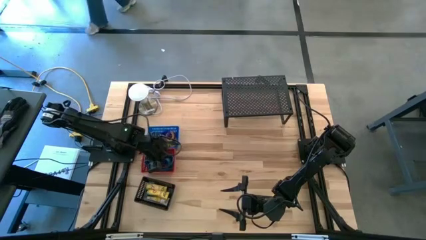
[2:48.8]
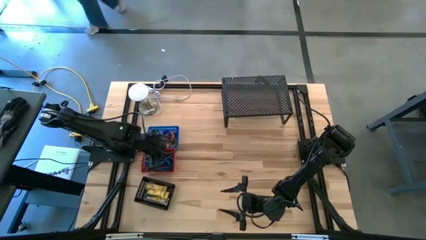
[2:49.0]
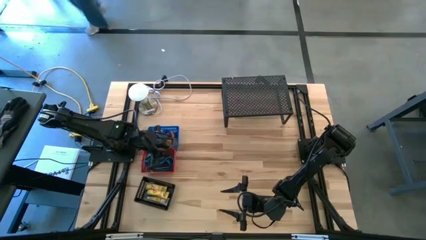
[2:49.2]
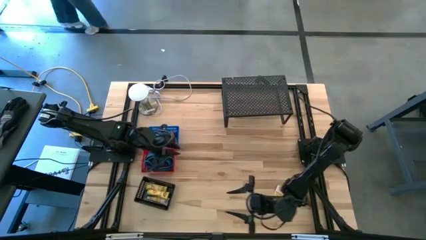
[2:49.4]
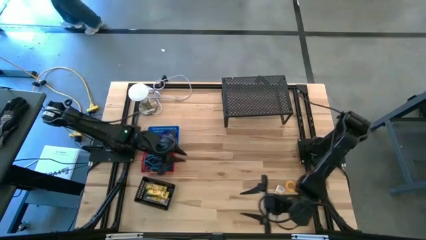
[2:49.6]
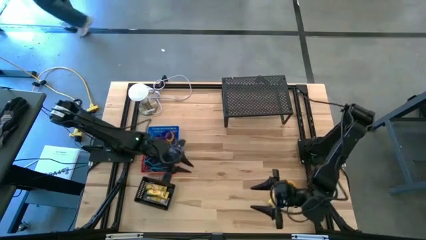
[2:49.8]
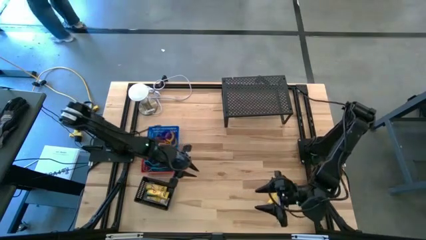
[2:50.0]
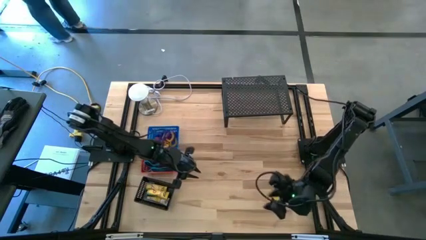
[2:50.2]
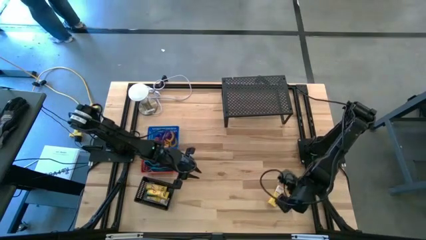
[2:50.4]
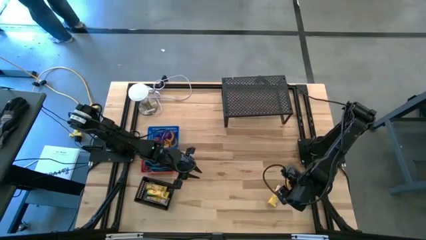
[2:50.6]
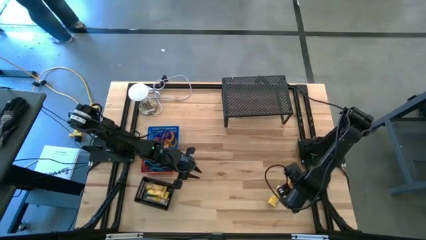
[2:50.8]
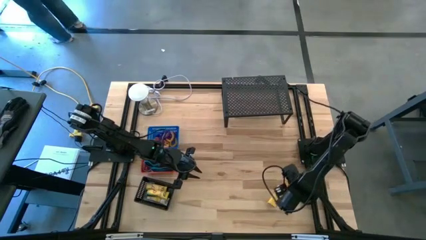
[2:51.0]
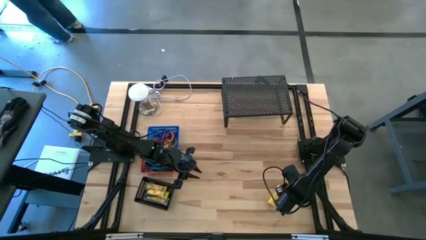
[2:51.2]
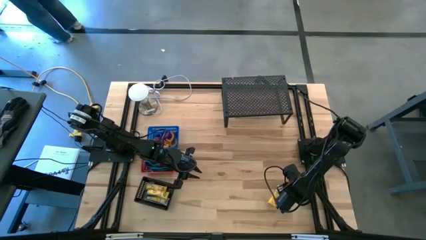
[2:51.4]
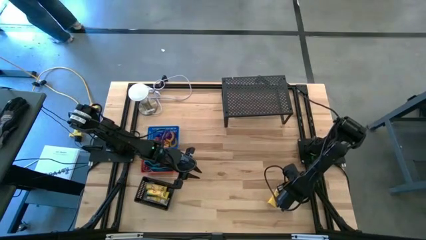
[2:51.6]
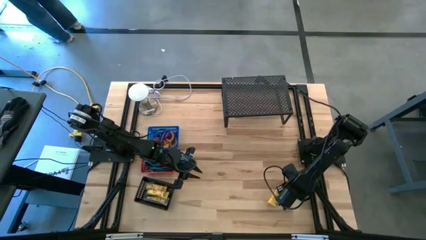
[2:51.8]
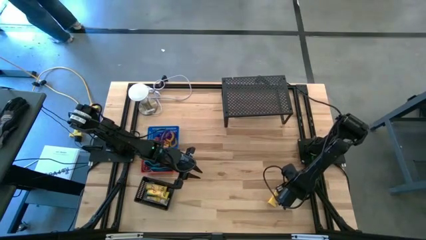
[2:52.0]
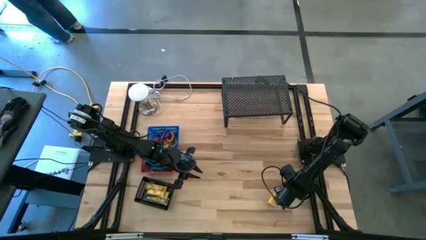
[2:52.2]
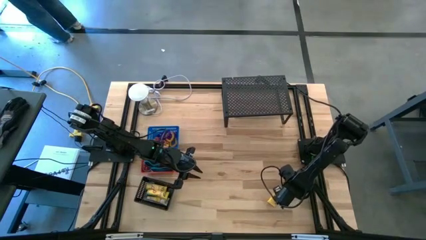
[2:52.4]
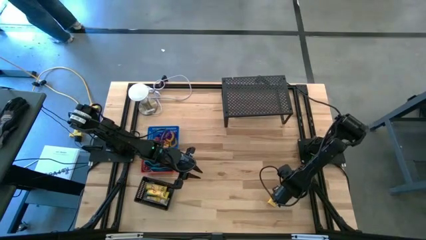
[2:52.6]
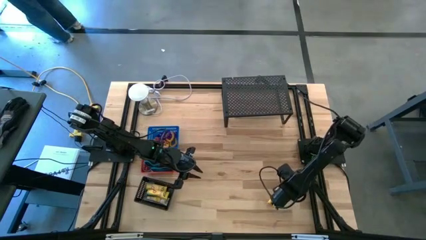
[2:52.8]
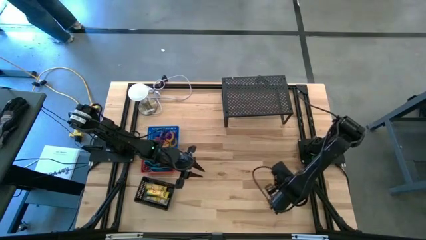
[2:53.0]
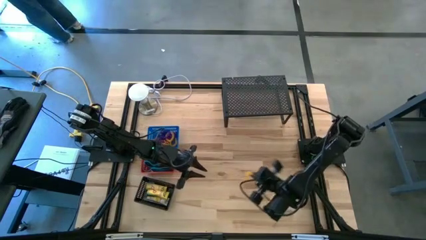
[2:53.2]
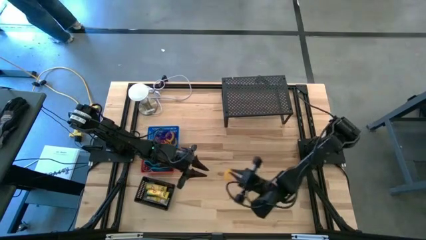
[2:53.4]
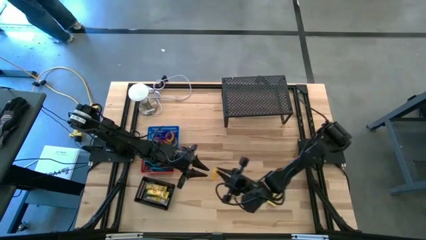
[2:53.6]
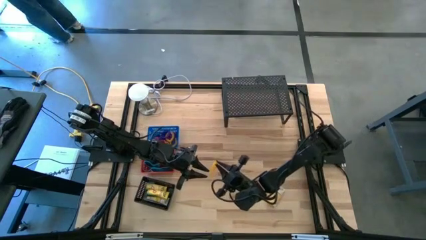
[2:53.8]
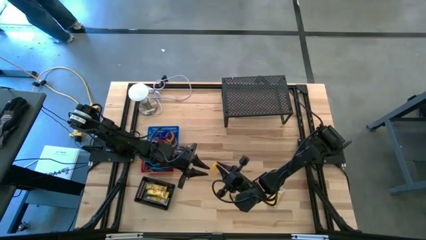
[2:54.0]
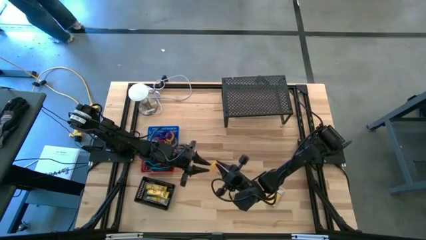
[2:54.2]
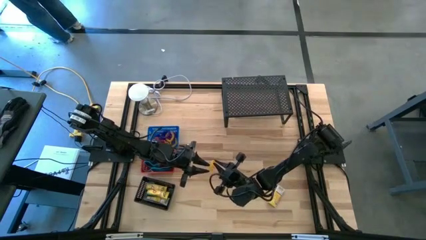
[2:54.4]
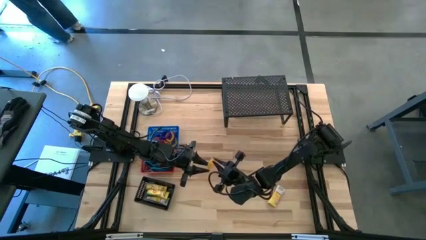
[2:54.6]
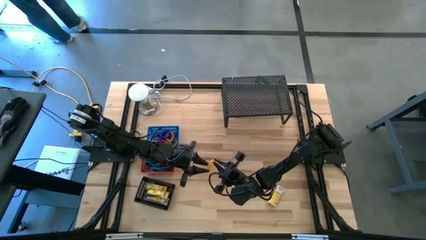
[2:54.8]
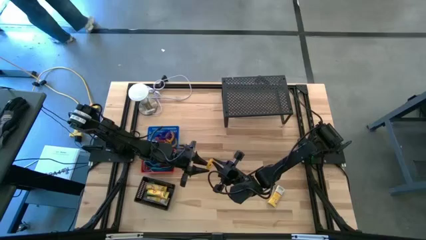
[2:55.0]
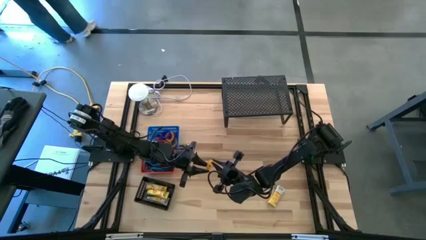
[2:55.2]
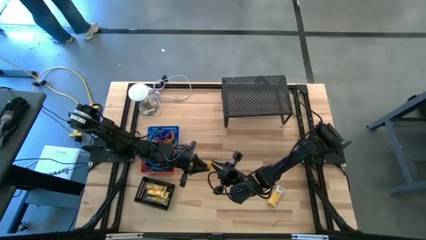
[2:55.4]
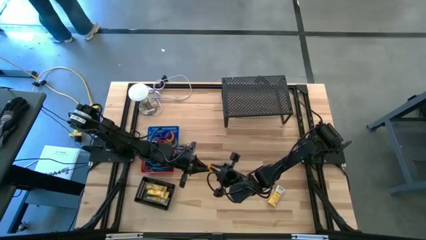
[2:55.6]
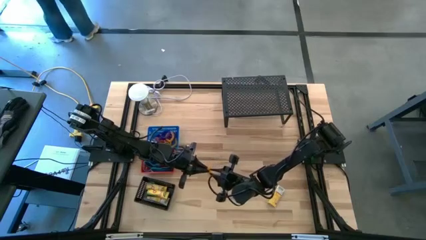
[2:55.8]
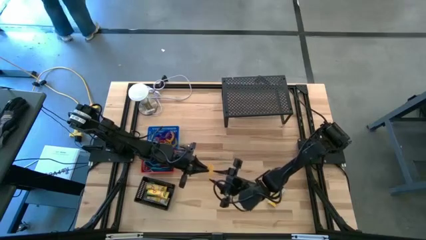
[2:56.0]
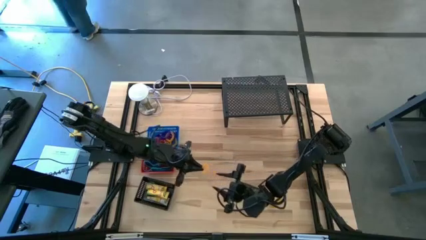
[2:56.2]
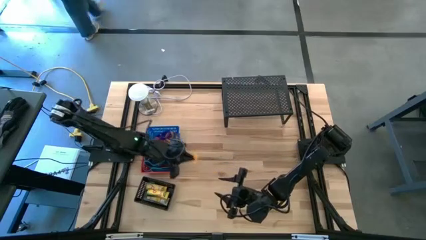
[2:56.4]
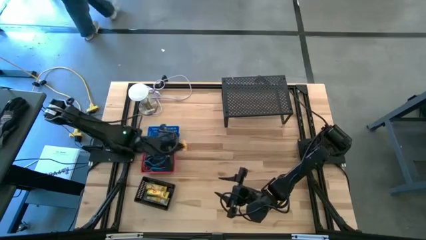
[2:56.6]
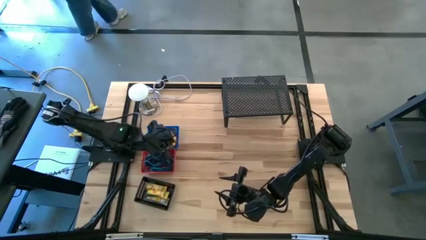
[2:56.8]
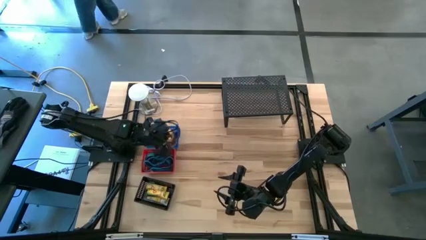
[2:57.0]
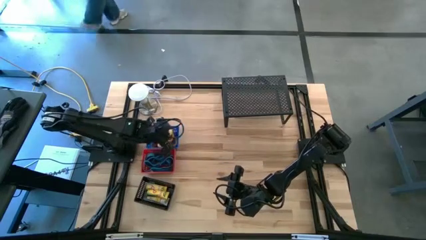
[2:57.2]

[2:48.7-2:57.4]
Task: Pick & Place Office Desk Supplies
Put the yellow spring keychain into the blue bin

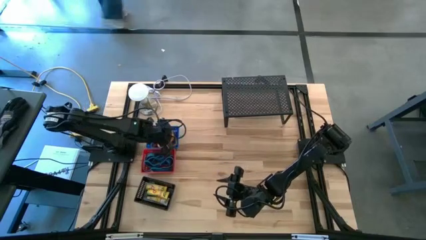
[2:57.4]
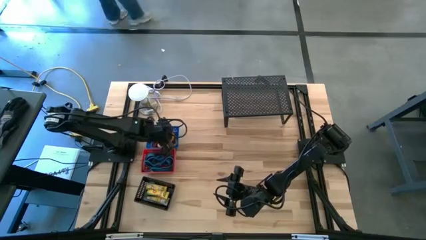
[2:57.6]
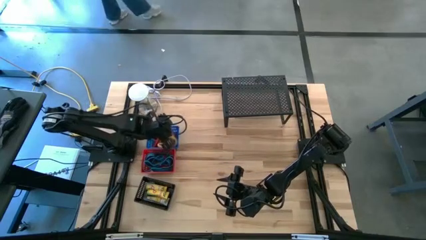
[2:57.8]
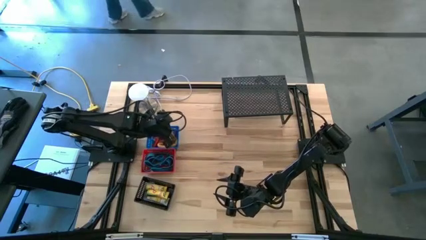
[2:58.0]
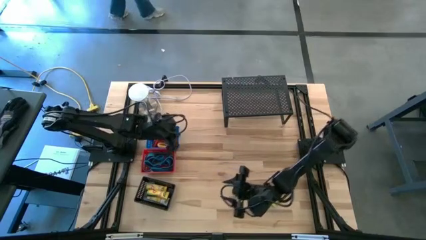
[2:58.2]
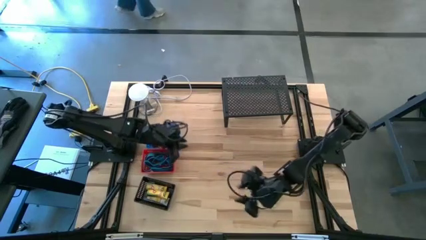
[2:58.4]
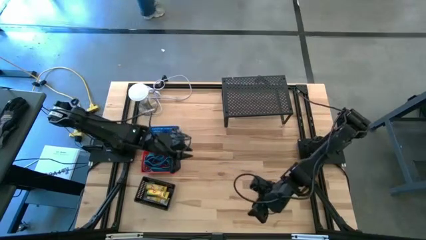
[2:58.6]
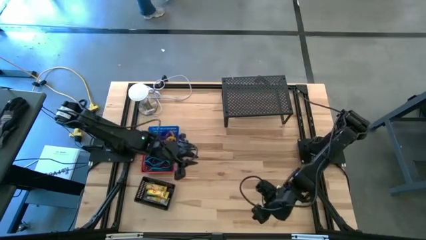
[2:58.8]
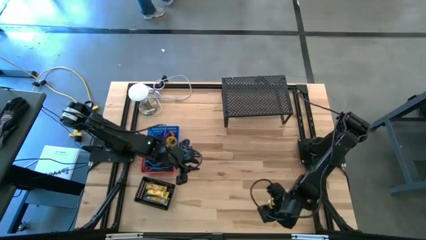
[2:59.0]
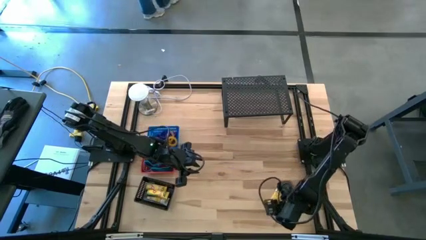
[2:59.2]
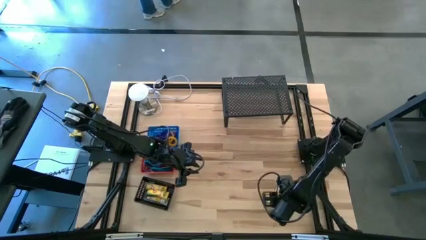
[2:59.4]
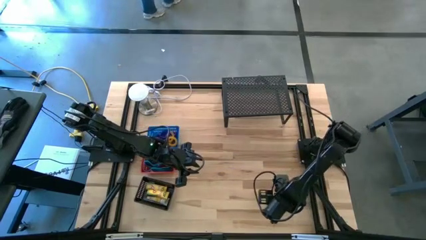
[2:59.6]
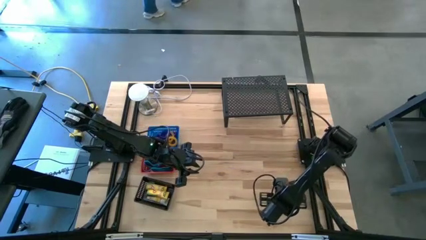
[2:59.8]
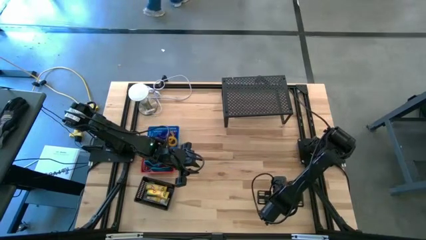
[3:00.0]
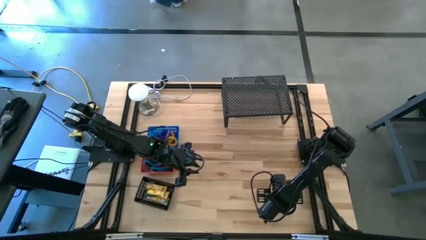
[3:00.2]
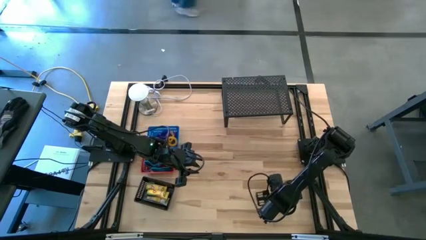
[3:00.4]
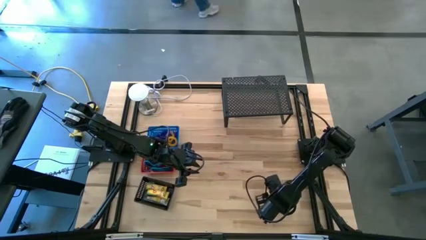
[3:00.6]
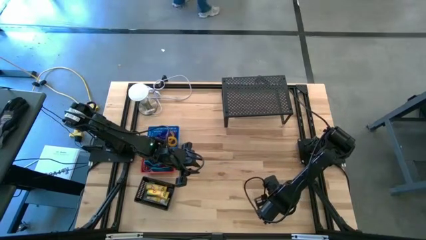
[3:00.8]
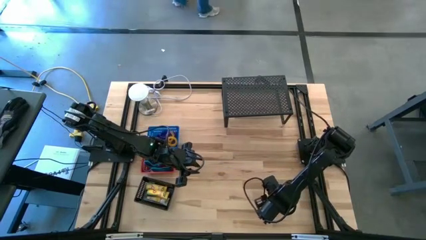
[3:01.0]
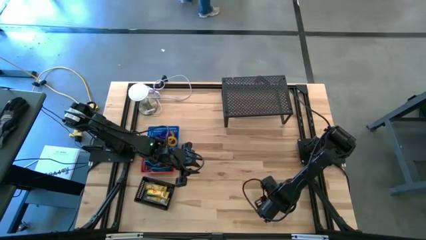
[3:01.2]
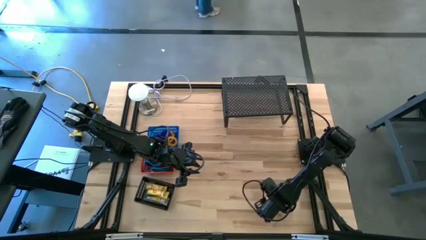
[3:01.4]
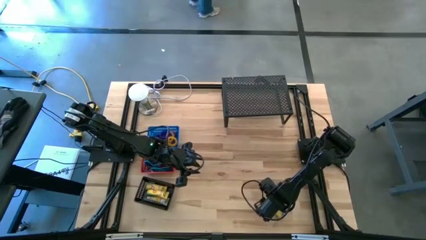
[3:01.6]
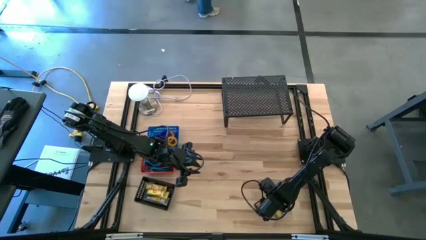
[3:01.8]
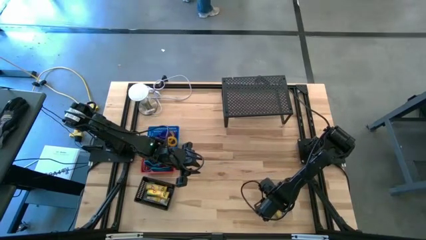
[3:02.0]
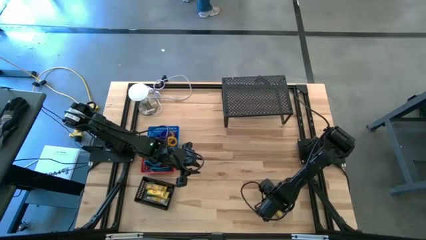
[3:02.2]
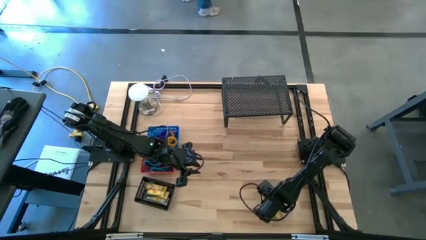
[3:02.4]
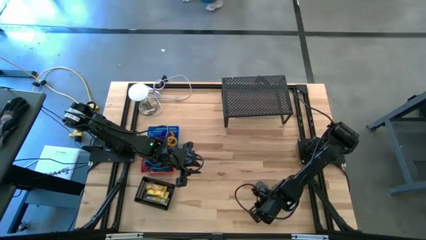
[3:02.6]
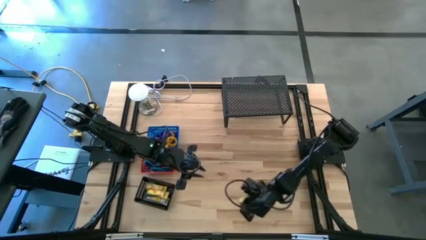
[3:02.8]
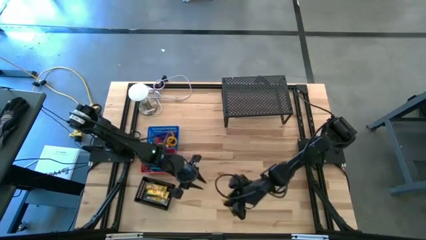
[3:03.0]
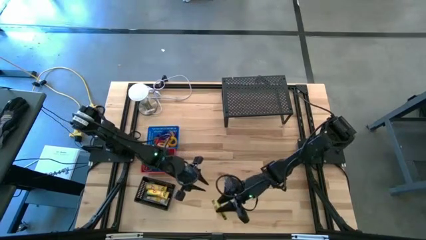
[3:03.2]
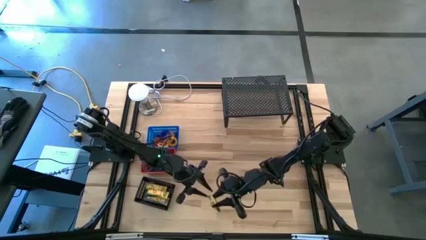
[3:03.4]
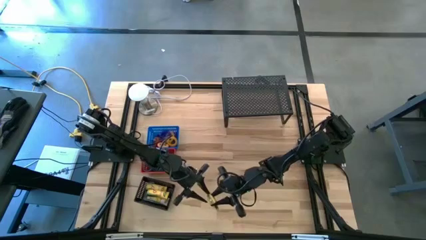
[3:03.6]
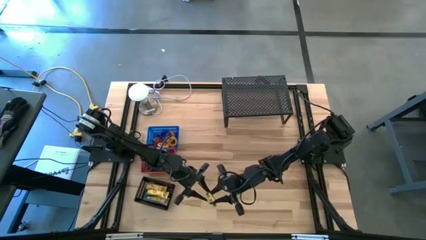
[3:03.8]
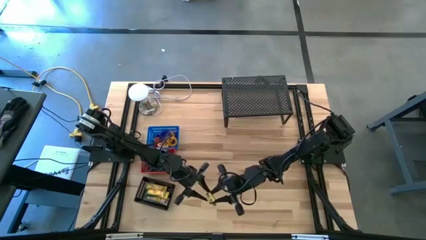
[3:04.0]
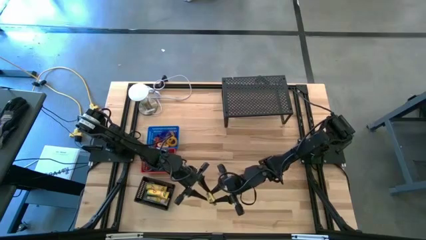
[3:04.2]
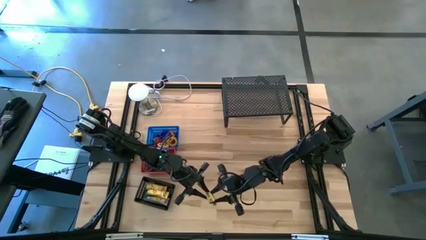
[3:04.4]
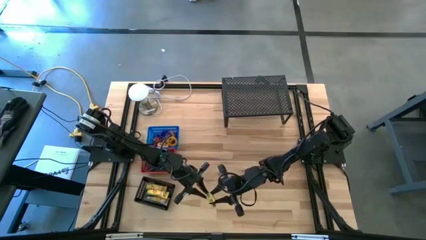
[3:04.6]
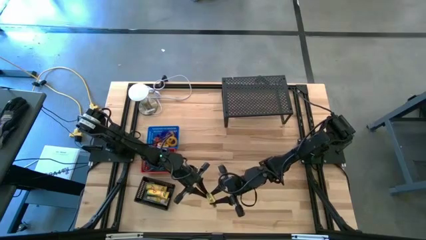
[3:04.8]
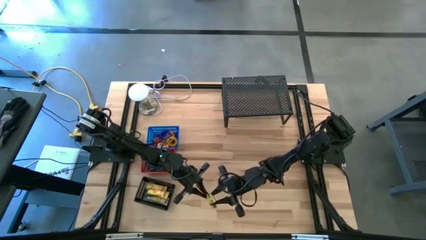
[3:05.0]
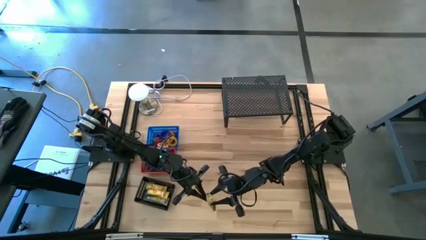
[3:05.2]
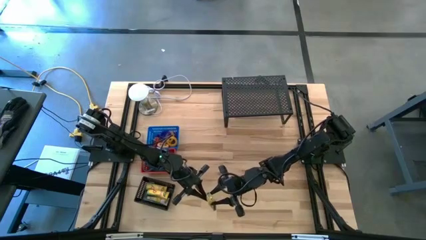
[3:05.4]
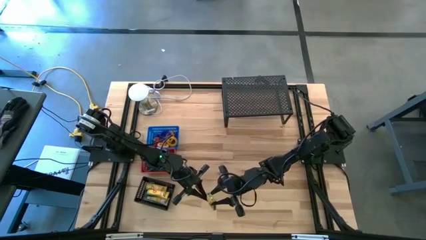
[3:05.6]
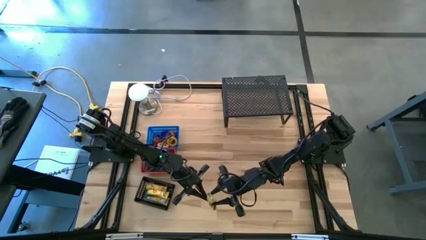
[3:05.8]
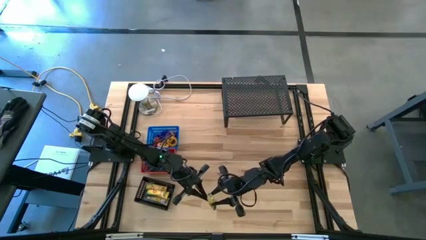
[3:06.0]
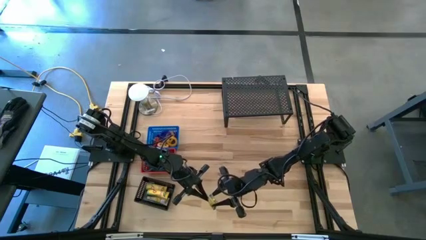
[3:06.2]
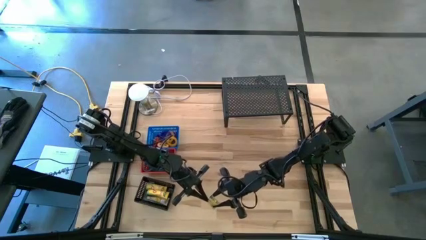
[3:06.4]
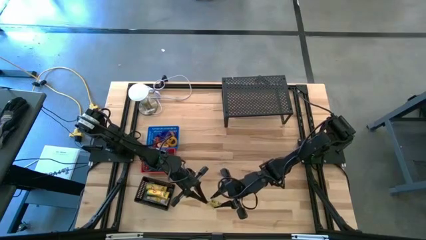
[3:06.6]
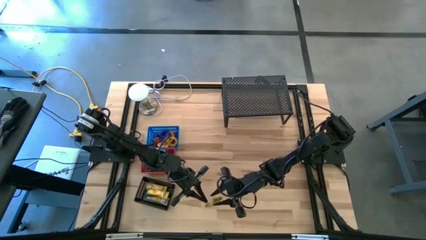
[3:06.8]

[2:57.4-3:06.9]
Put the yellow crayon box into the black bin
